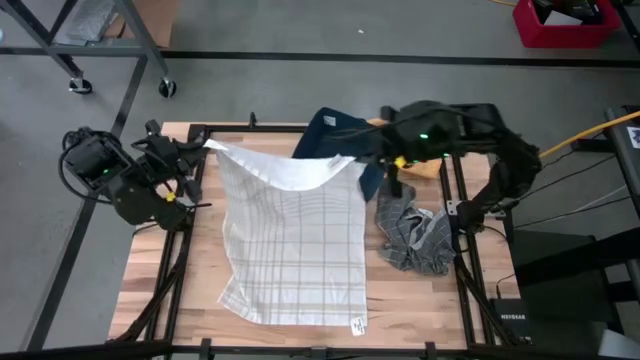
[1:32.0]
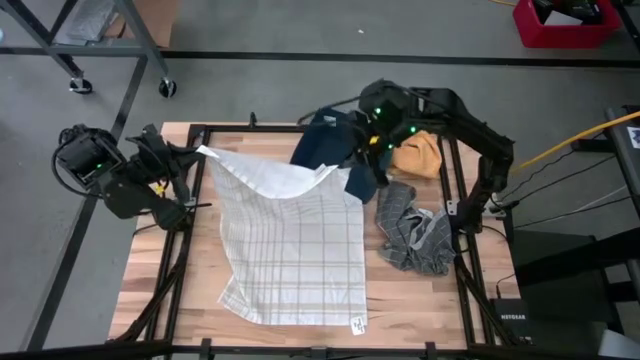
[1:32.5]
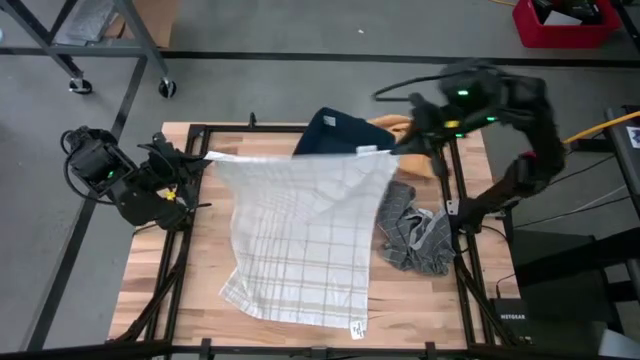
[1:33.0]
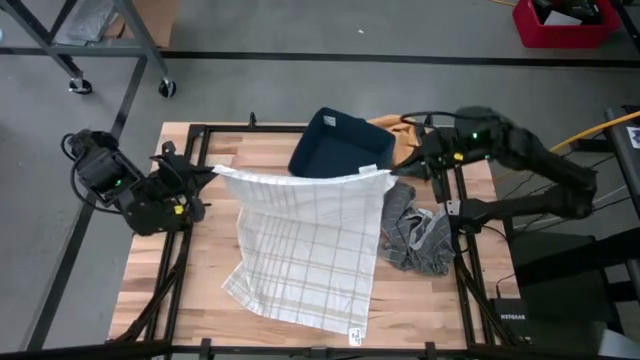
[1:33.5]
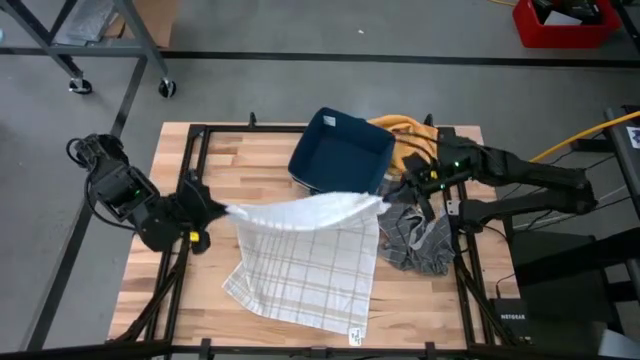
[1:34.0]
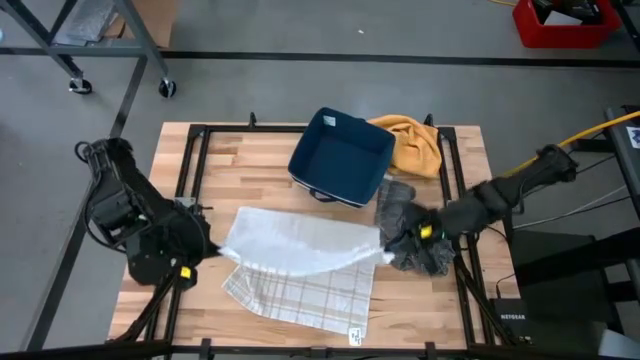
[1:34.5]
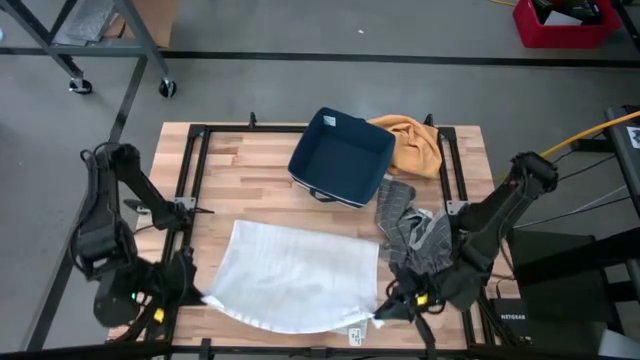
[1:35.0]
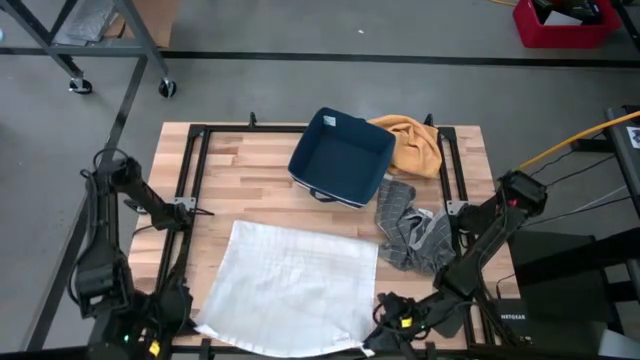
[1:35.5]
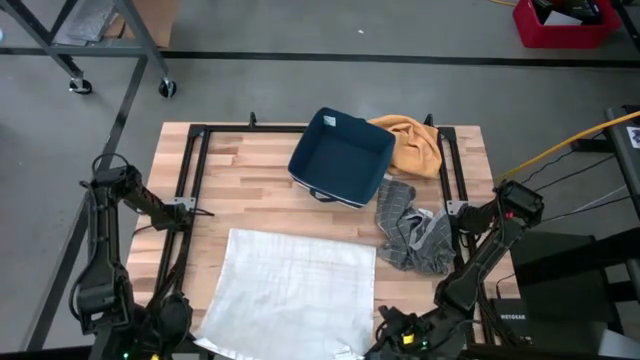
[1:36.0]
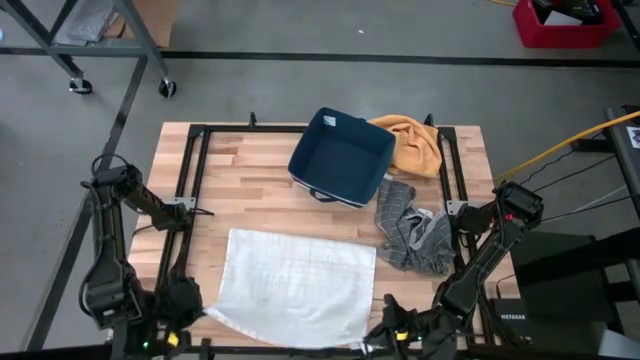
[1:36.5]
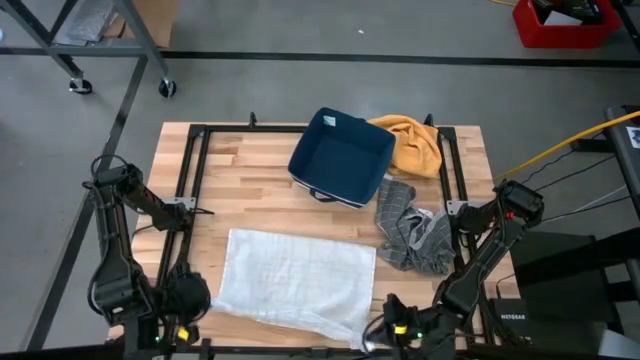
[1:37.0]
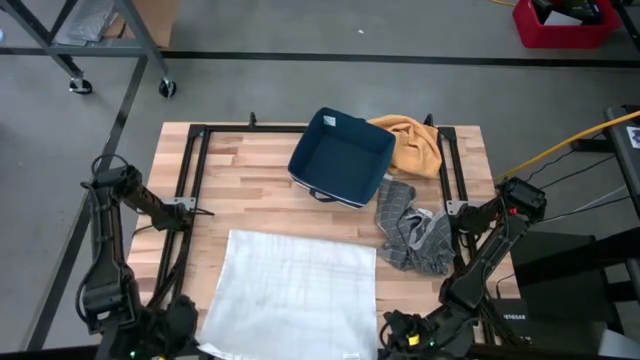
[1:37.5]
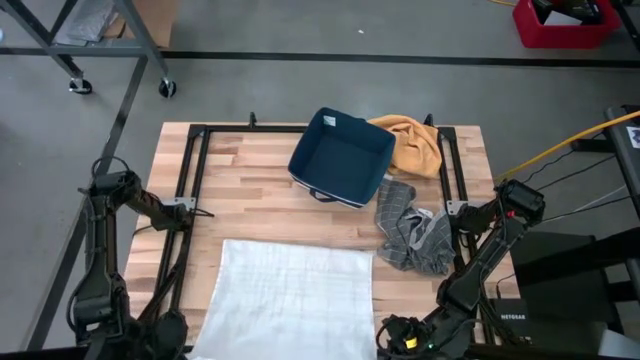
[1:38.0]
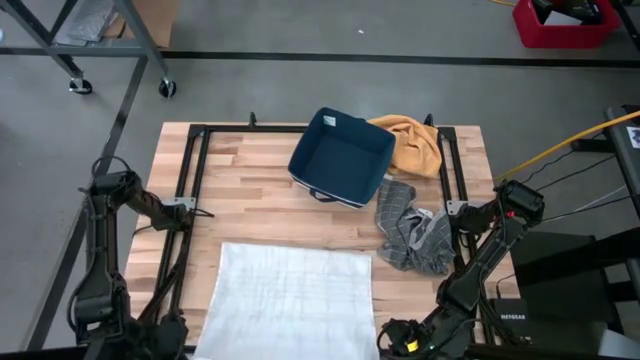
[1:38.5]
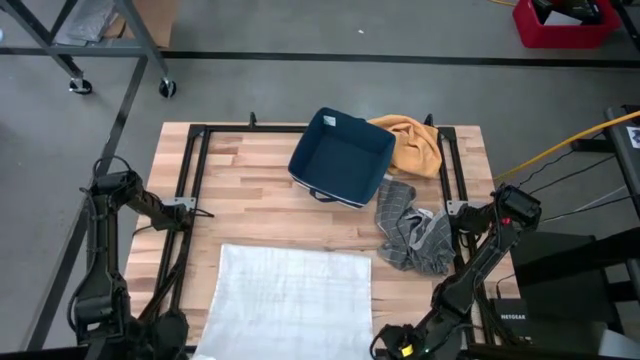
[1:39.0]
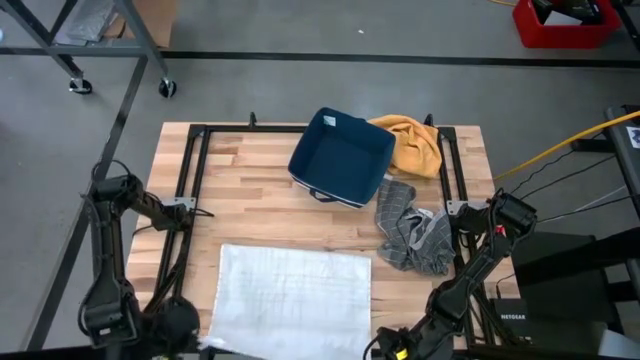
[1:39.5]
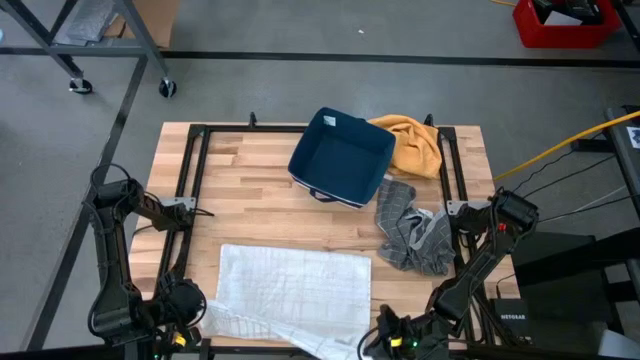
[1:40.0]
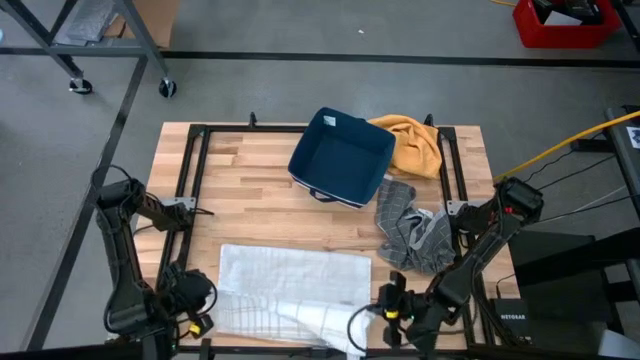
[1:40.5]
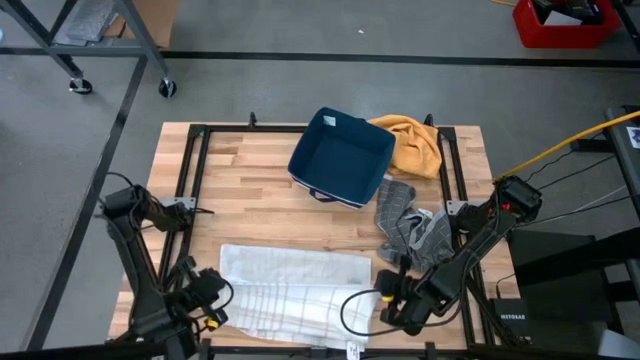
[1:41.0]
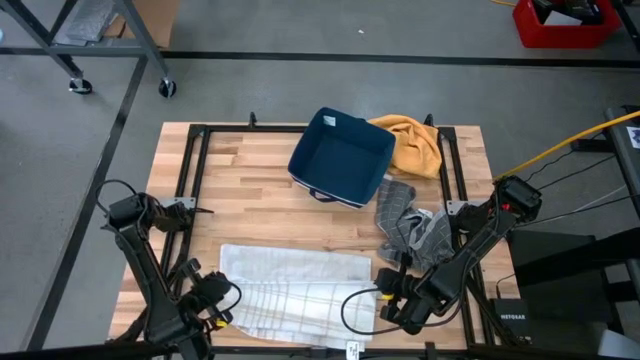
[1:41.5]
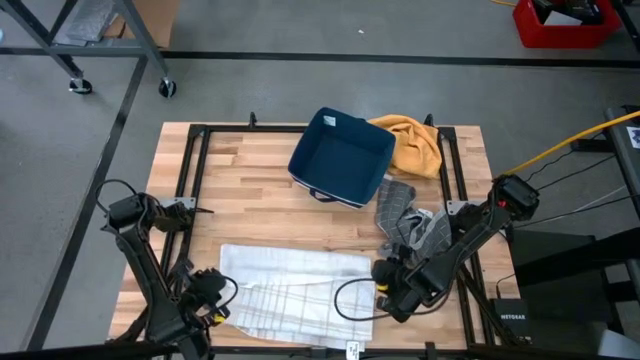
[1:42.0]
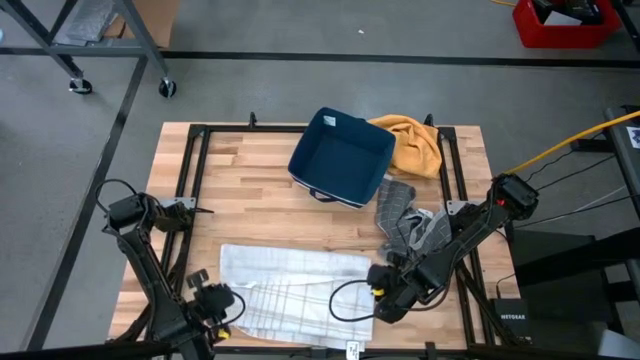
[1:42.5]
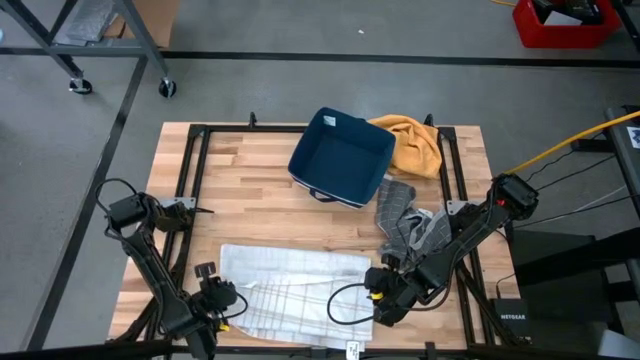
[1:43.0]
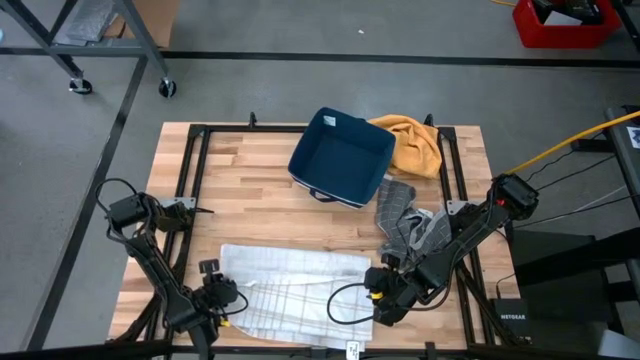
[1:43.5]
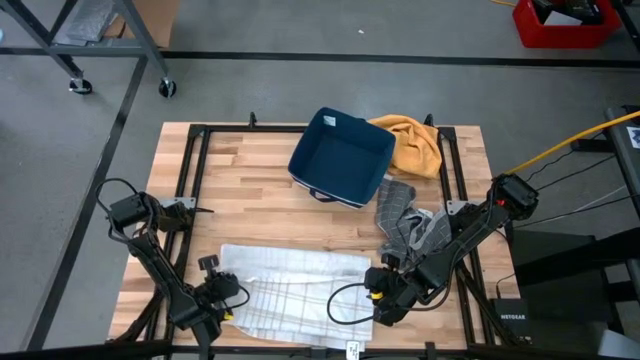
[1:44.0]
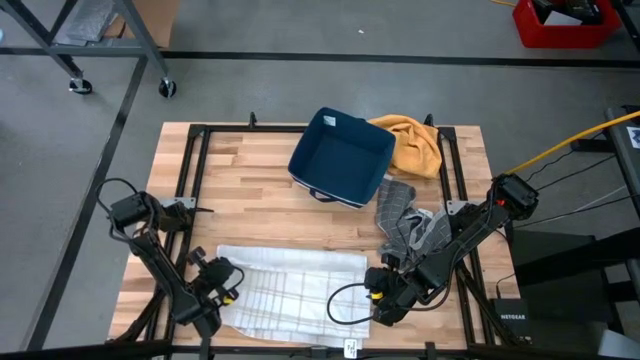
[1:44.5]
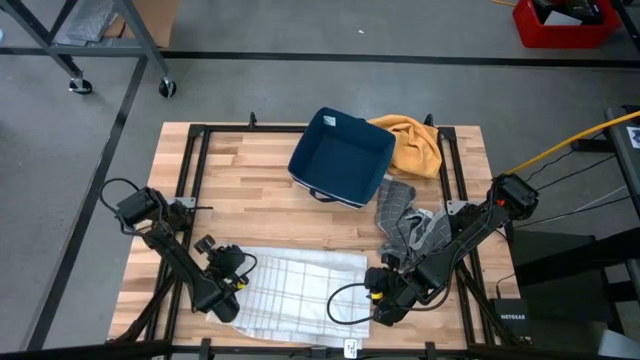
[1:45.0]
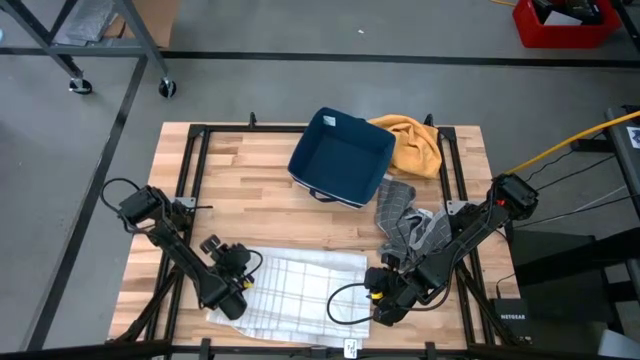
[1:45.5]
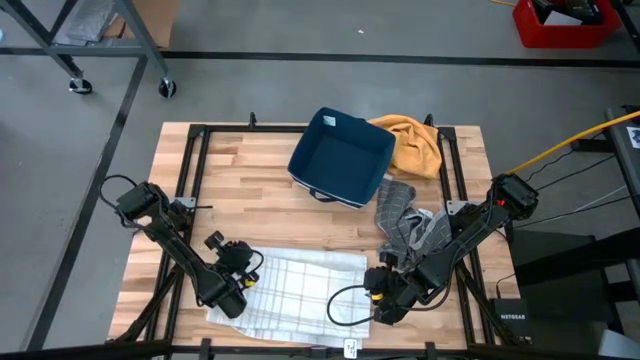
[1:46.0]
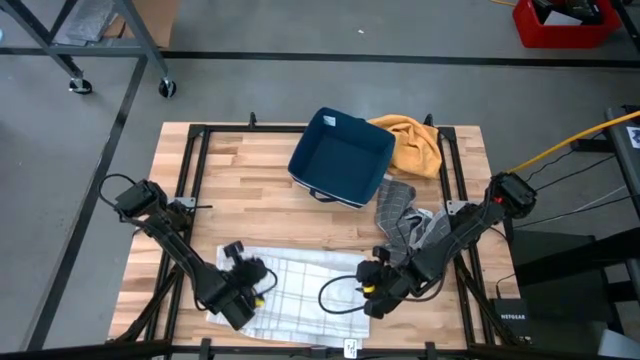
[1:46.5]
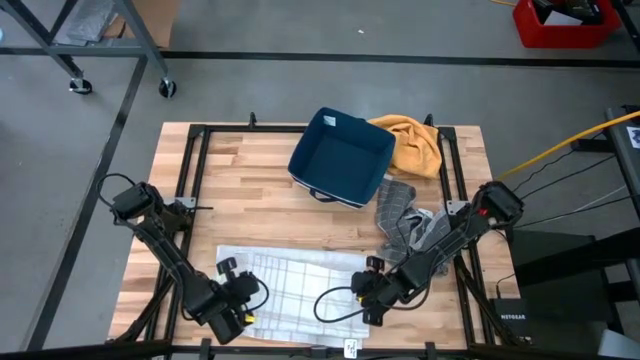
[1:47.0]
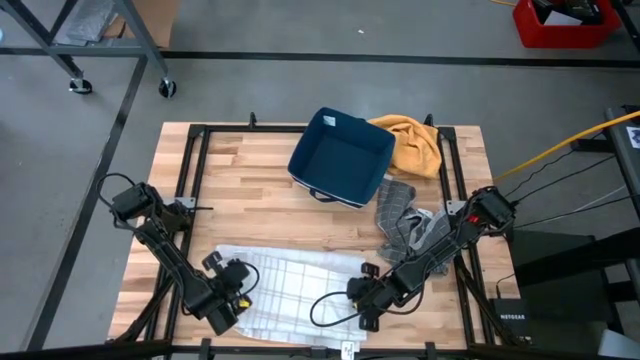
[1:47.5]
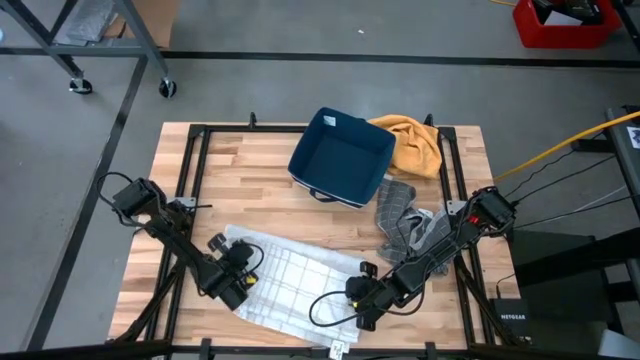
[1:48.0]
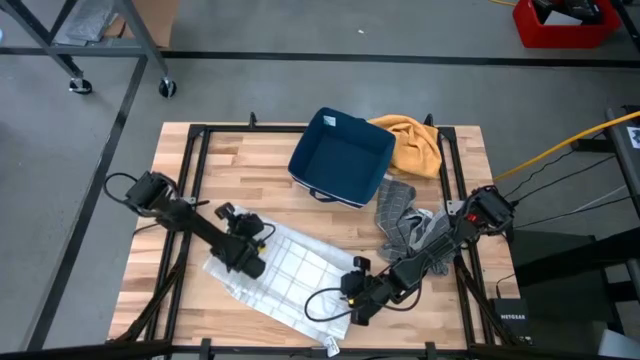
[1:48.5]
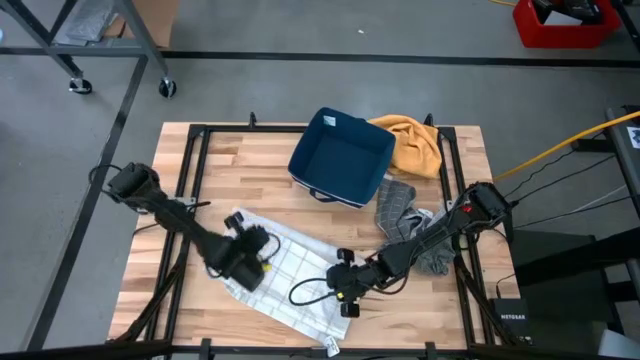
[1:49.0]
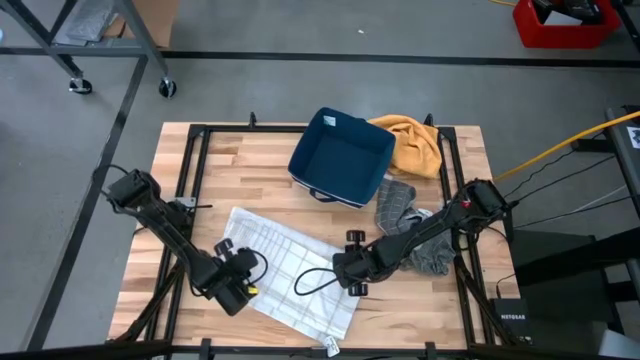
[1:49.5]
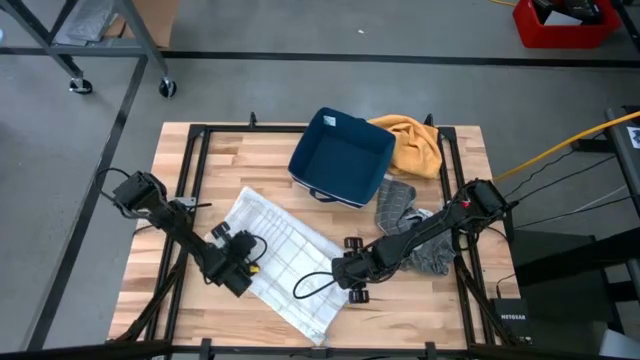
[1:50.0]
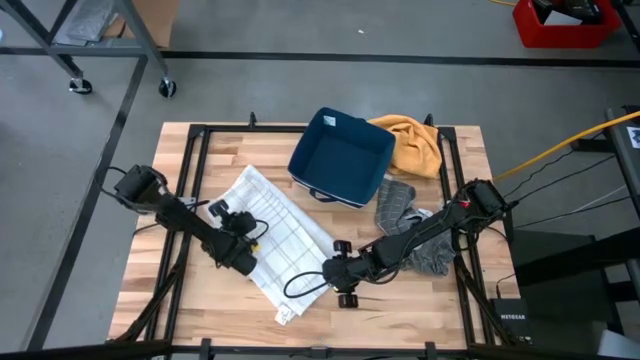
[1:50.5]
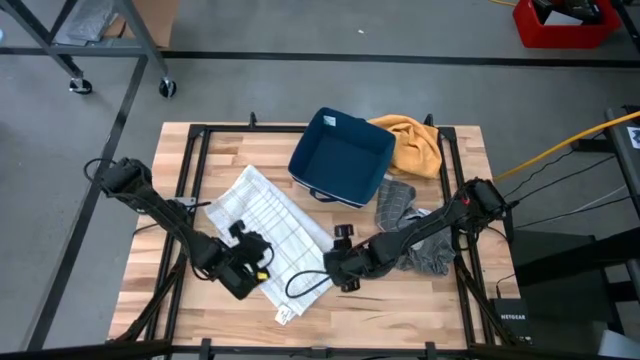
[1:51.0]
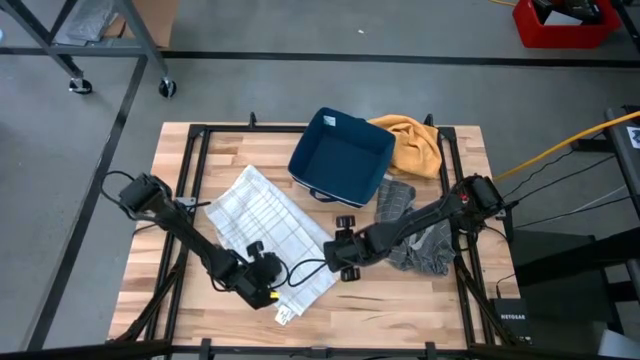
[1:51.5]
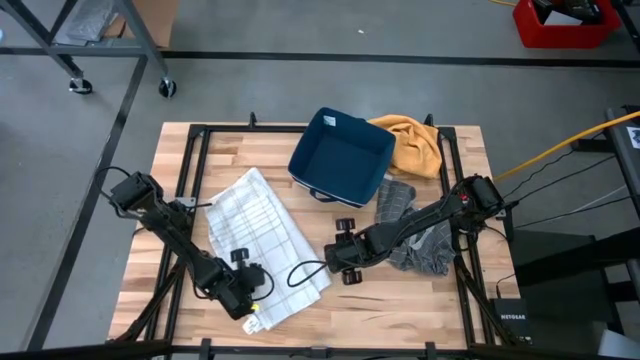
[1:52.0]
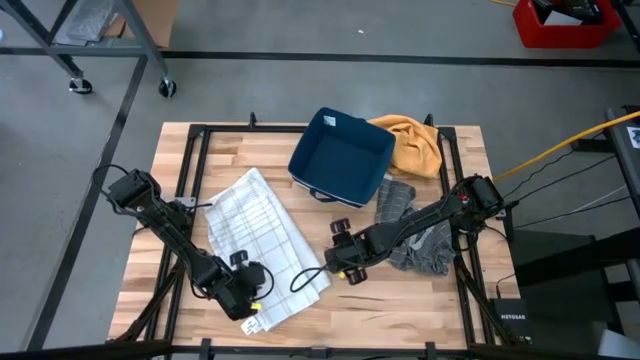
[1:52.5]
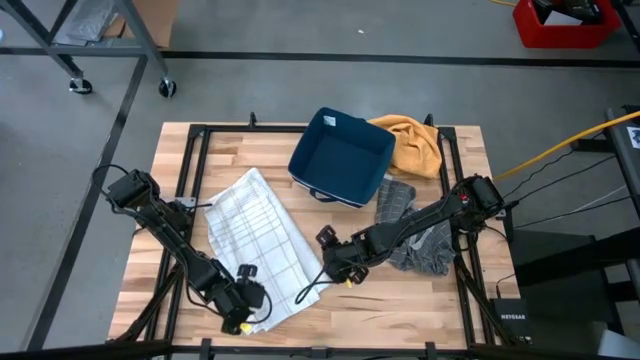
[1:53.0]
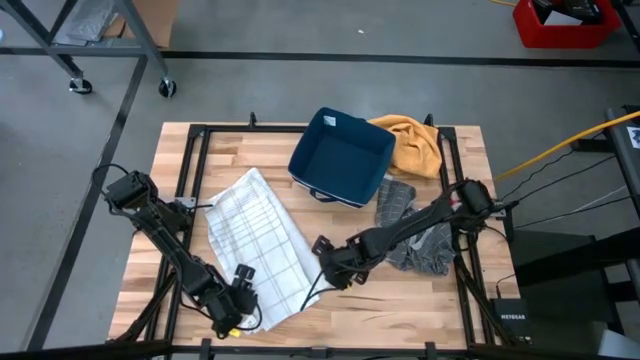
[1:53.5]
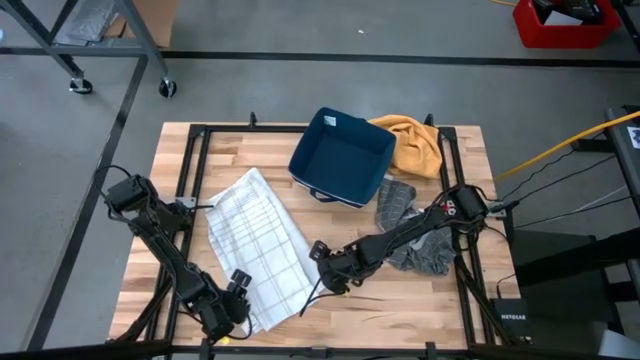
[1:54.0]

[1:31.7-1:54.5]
Task: Fold towel
Fold the white patterned towel
